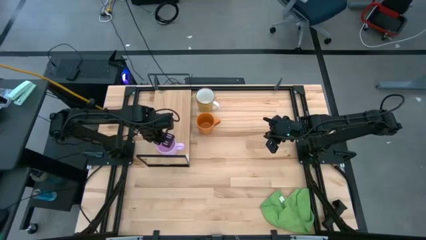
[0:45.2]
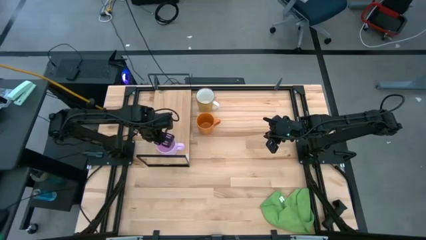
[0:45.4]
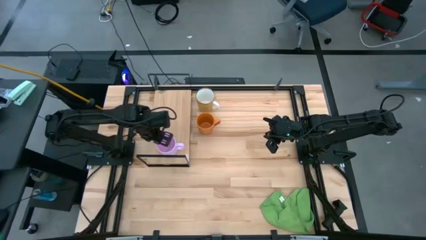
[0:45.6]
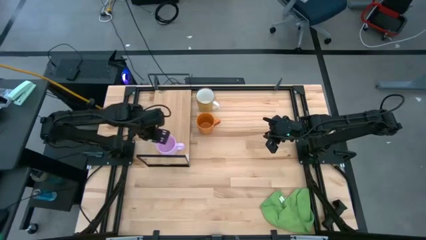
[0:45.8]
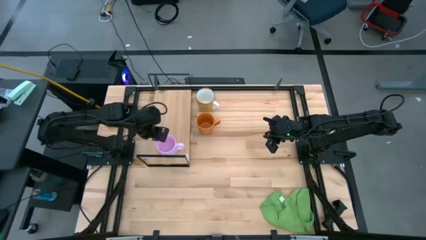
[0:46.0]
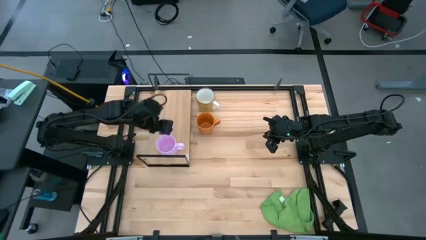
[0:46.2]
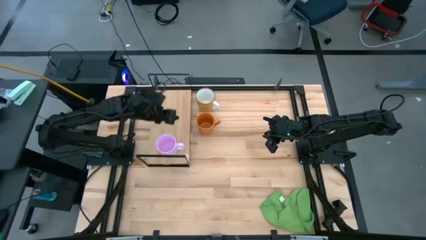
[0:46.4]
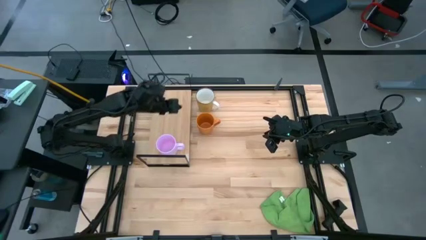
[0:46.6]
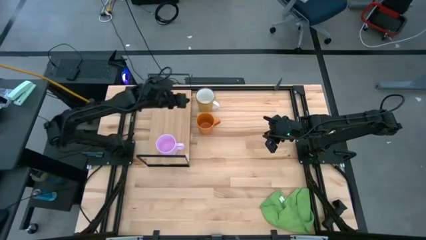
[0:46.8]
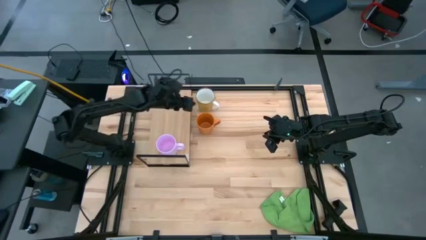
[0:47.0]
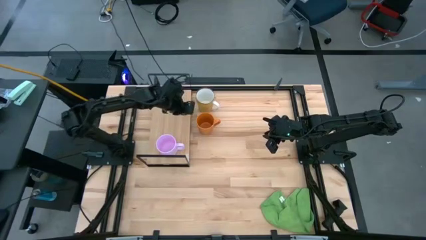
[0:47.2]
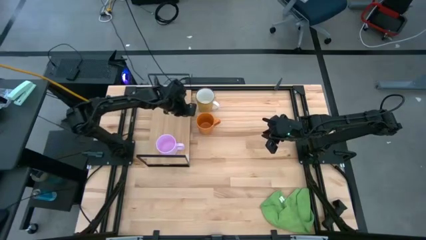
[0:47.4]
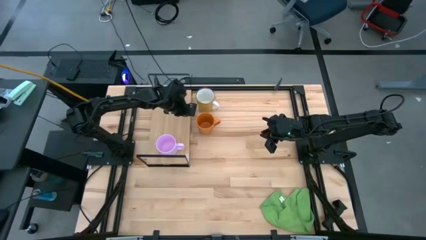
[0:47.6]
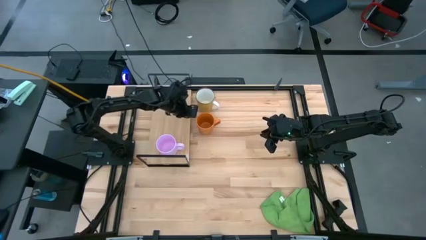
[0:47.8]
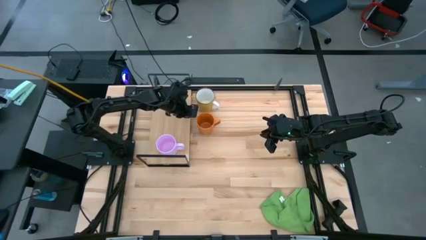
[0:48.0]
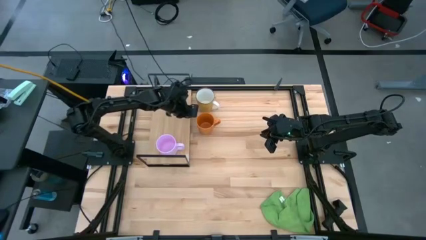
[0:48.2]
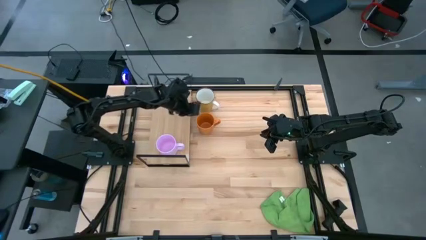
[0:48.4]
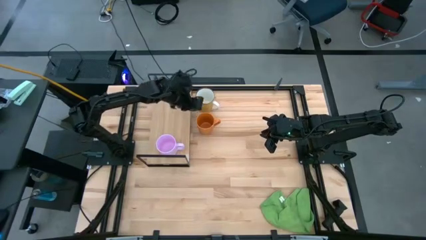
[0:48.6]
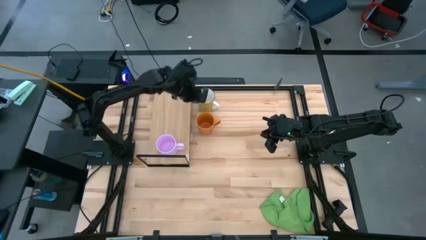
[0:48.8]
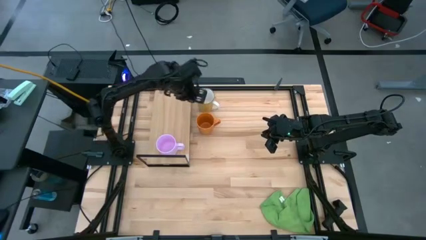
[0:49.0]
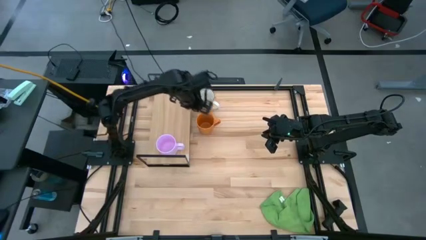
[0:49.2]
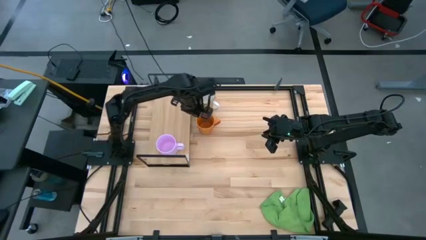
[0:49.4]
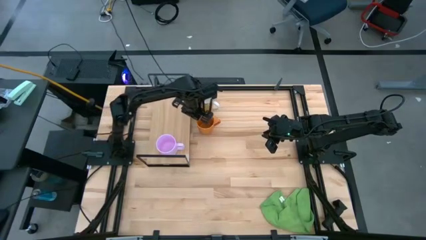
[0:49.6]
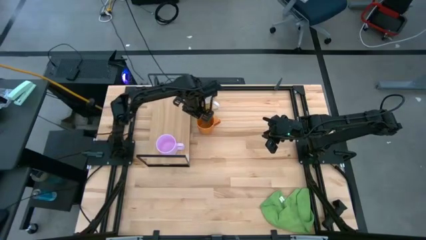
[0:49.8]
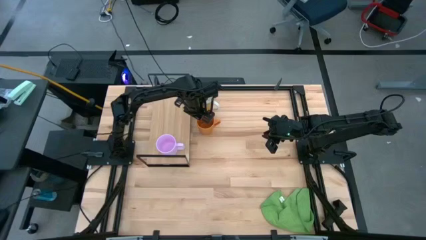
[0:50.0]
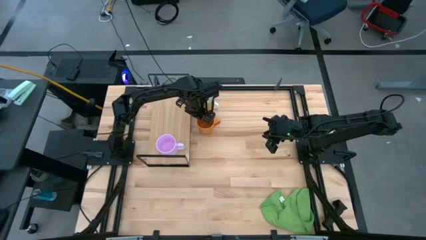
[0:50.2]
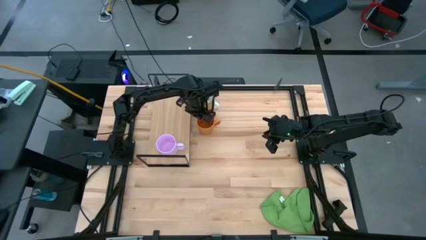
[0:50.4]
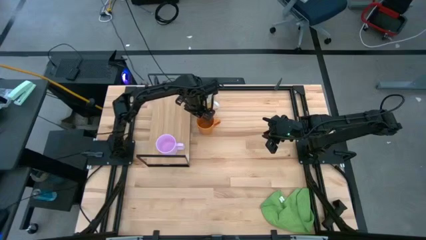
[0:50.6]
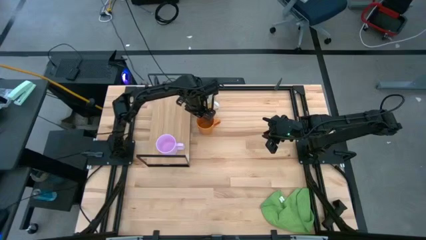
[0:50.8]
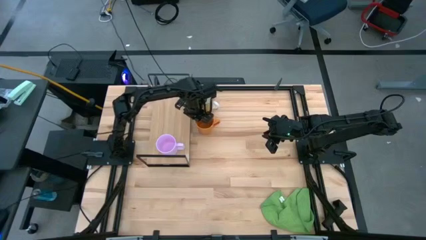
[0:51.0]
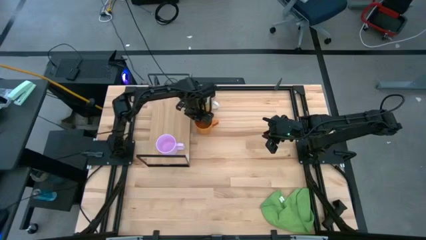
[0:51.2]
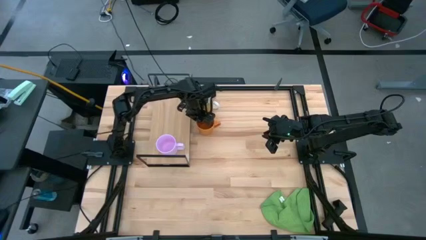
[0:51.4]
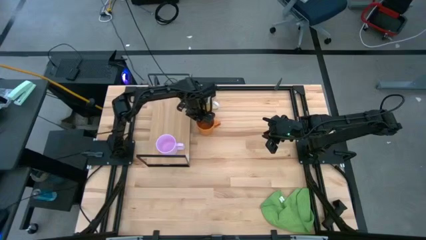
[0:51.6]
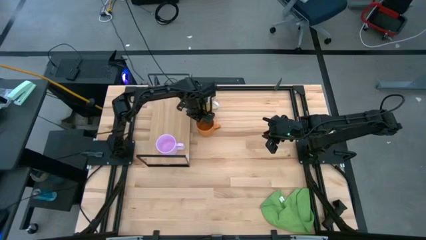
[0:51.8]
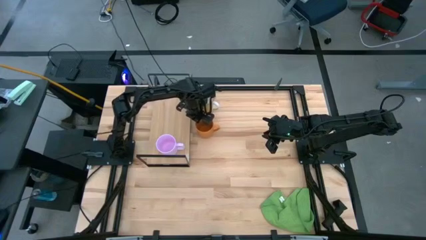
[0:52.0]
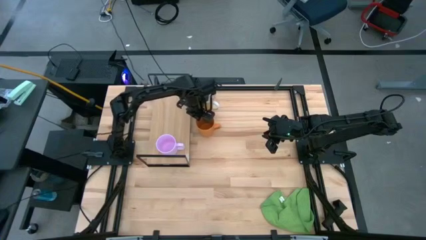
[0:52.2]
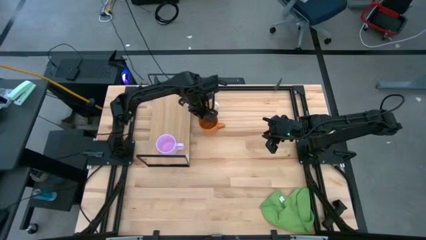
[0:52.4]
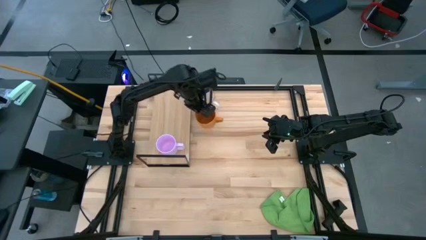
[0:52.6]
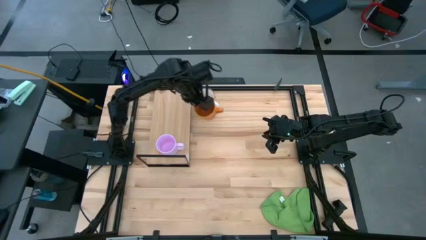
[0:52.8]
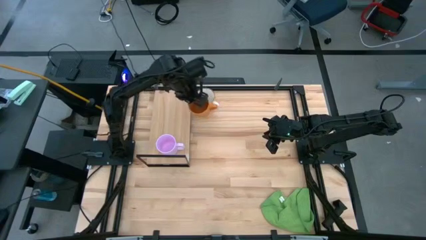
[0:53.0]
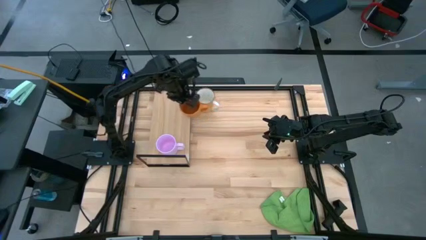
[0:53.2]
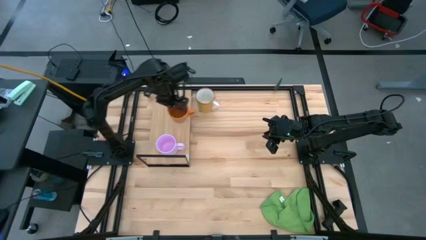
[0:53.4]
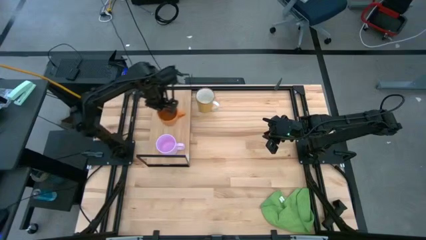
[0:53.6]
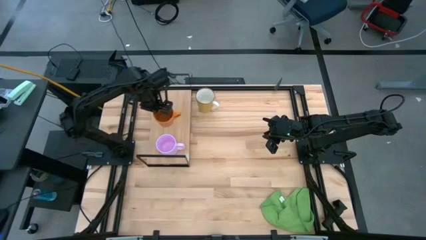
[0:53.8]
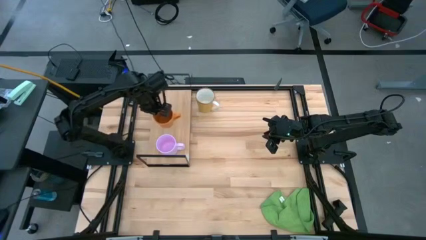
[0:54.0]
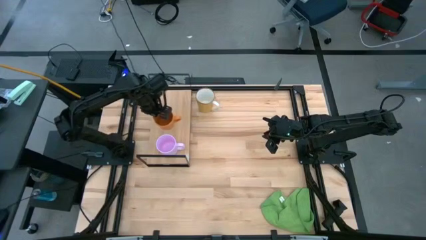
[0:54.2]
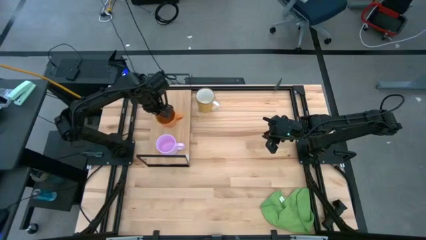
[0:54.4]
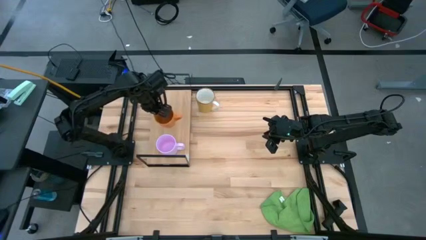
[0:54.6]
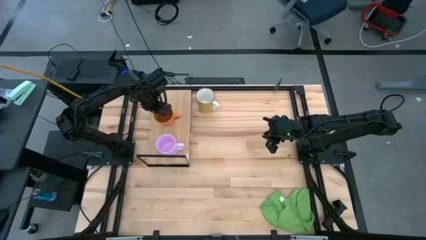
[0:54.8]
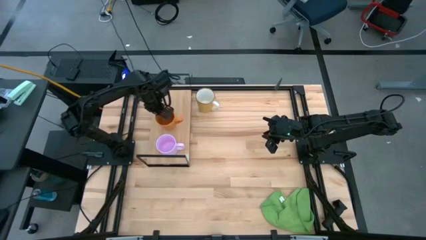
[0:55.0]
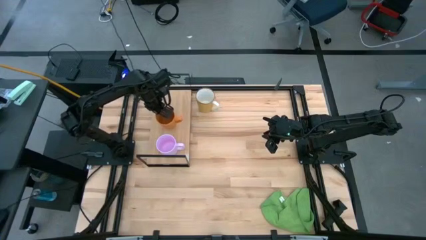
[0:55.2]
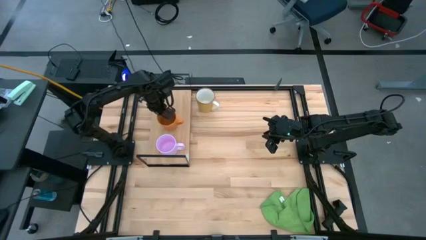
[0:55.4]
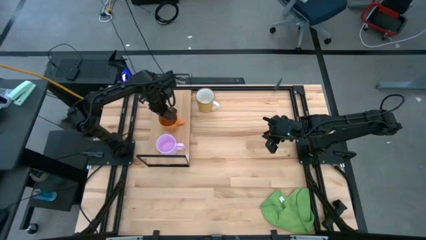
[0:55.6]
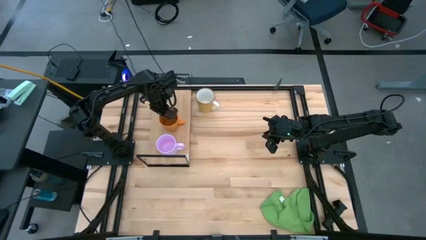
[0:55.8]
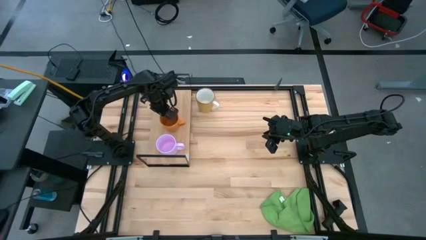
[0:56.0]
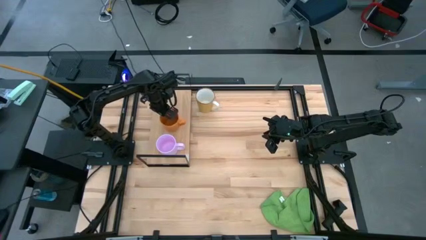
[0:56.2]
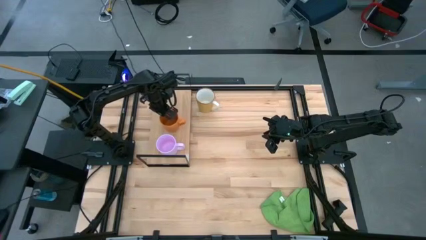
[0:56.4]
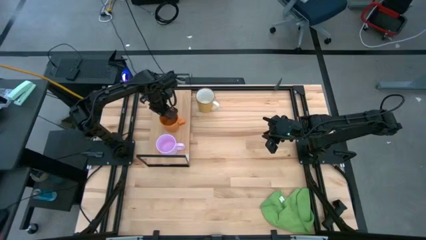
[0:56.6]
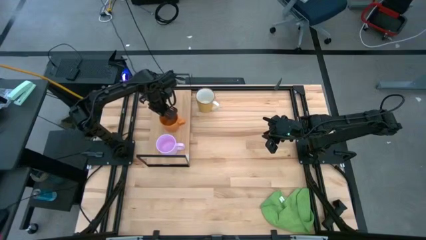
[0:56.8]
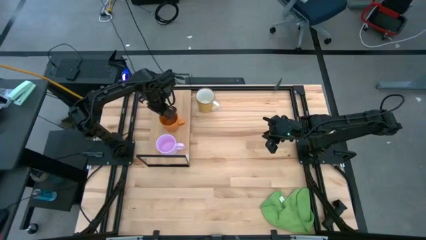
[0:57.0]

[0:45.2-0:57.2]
Task: Stack small to large cups/mugs on shelf
Put the orange mug on the shelf

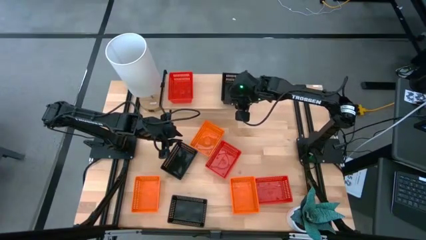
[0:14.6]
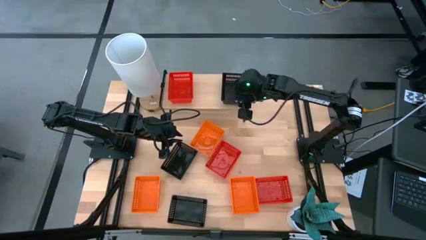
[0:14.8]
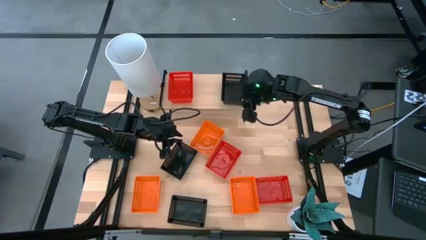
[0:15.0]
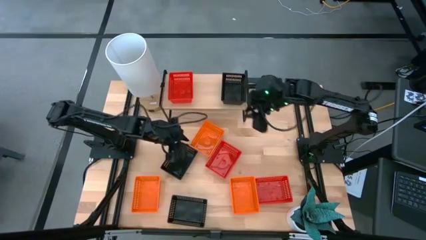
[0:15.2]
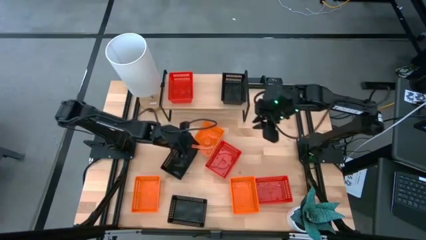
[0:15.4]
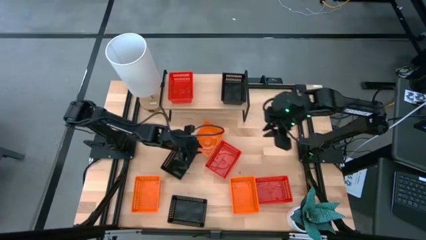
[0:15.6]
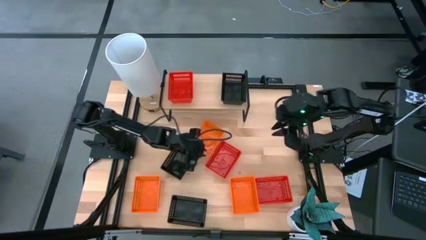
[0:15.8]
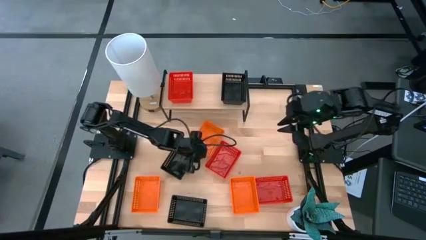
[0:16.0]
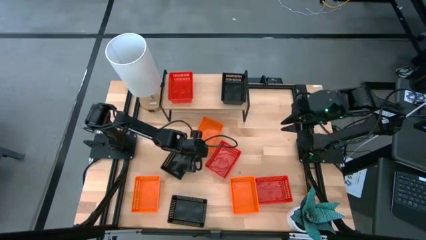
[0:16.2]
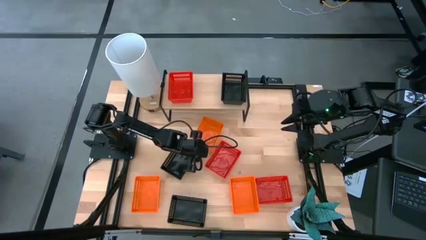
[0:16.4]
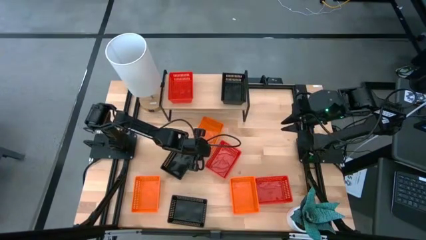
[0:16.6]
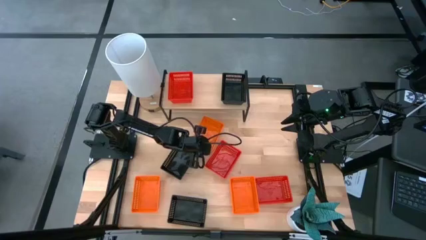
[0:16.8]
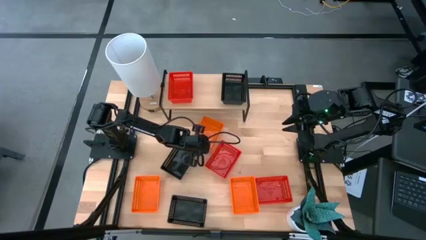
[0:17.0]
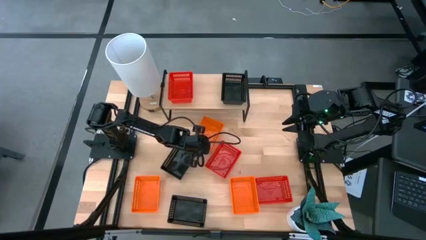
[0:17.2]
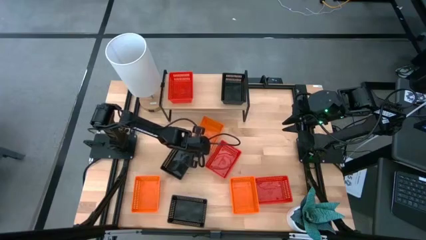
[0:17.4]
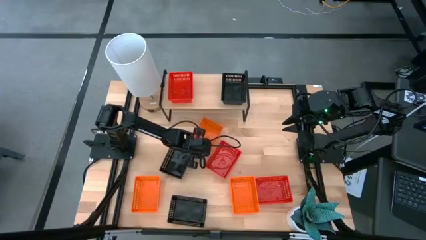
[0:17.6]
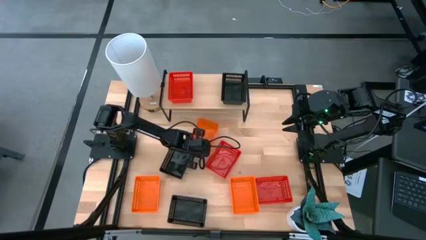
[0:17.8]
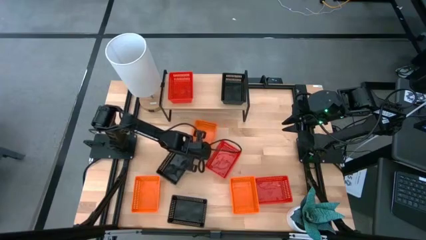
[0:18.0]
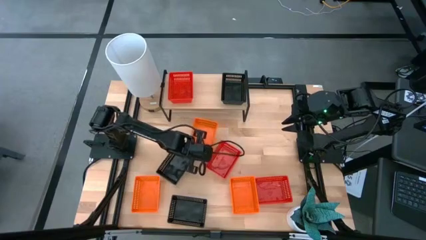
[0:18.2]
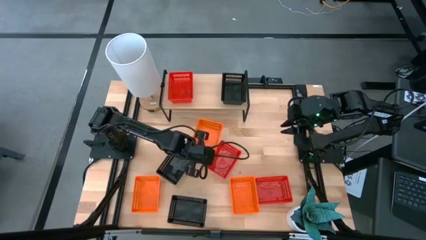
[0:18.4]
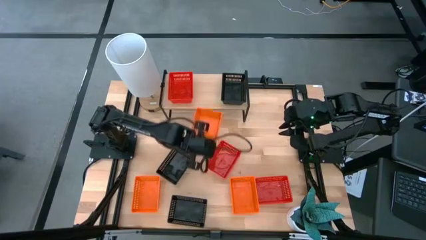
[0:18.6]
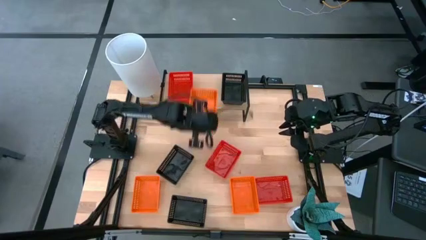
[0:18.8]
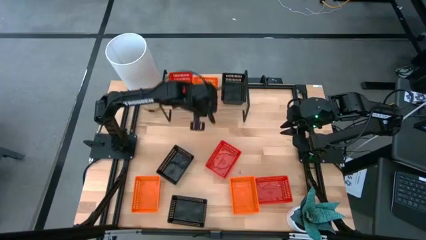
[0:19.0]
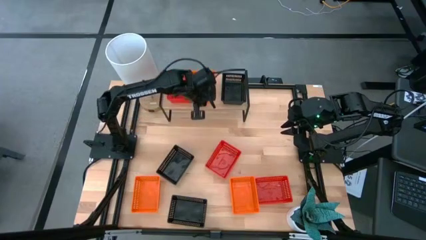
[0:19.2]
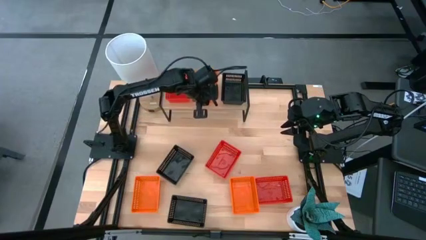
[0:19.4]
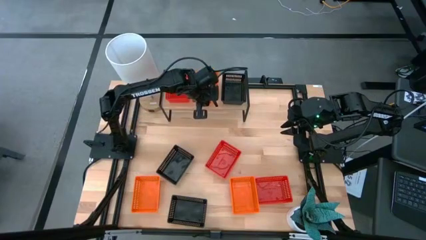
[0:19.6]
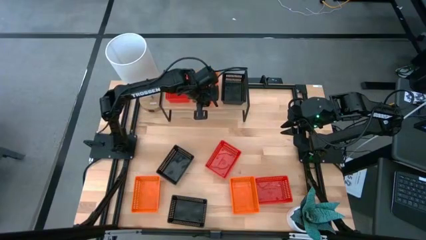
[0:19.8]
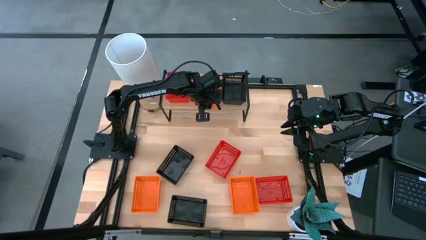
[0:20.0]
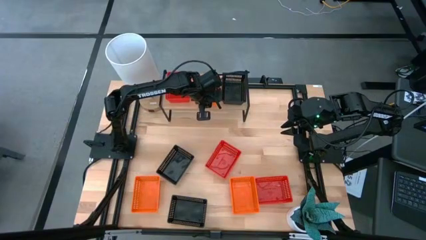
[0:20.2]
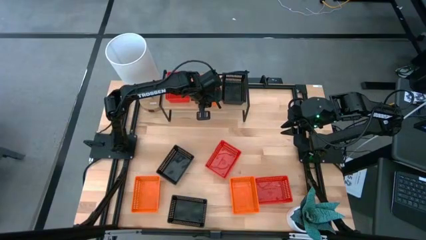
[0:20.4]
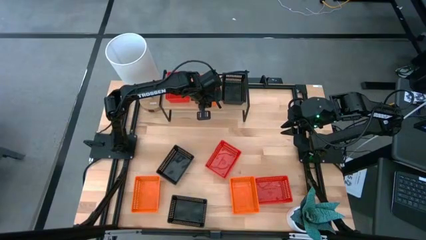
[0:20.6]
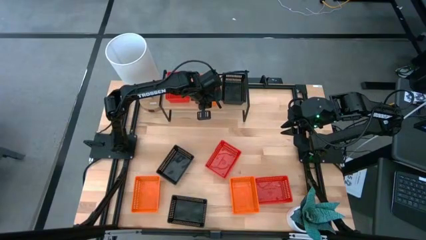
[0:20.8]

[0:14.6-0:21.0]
Task: Stack baskets on shelf by color
Put the top orange bin on the shelf
